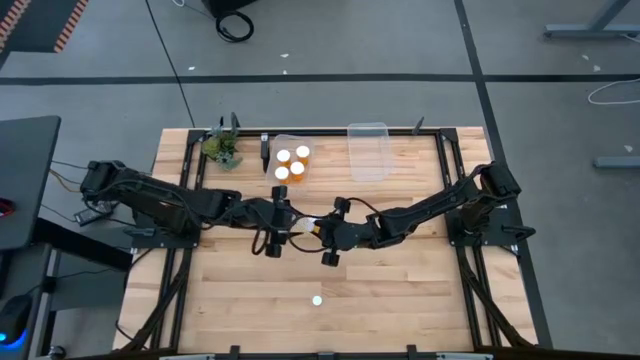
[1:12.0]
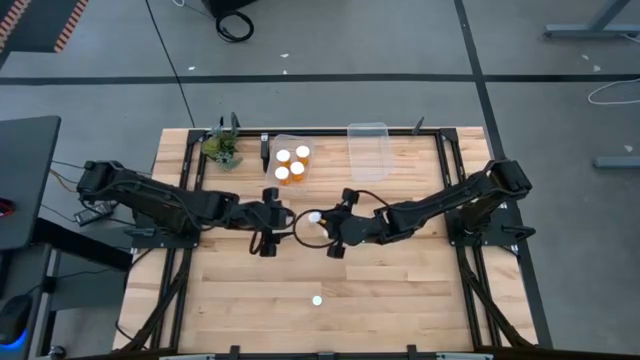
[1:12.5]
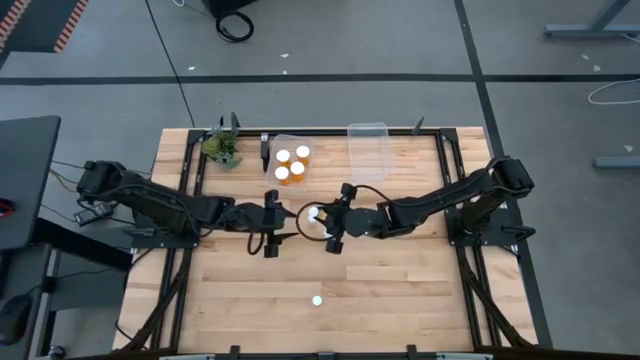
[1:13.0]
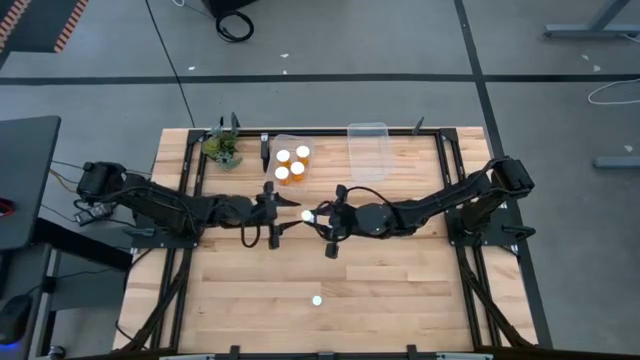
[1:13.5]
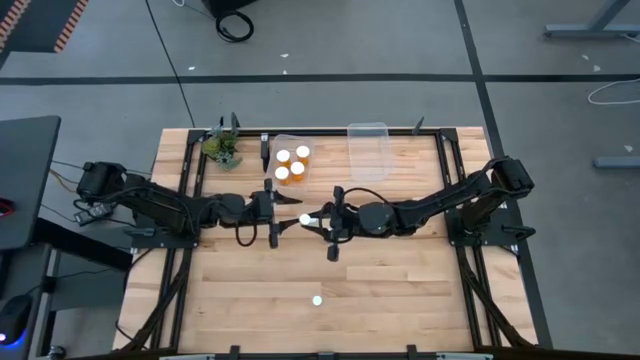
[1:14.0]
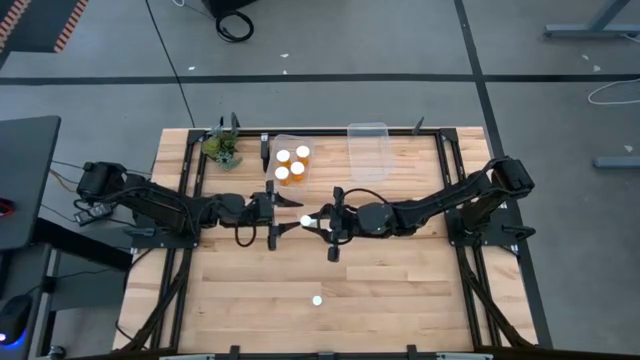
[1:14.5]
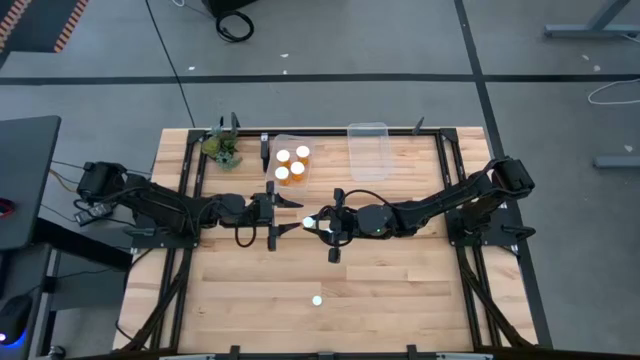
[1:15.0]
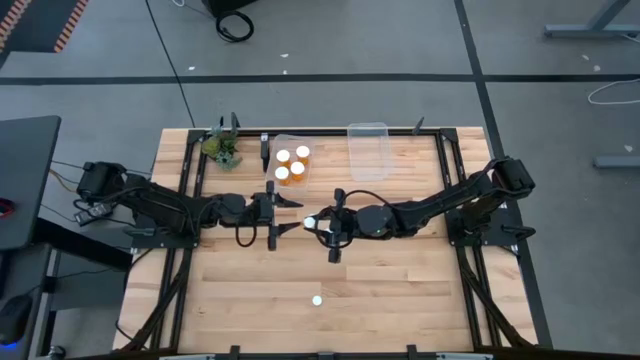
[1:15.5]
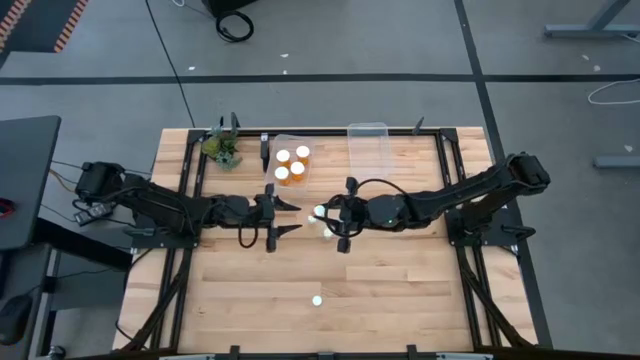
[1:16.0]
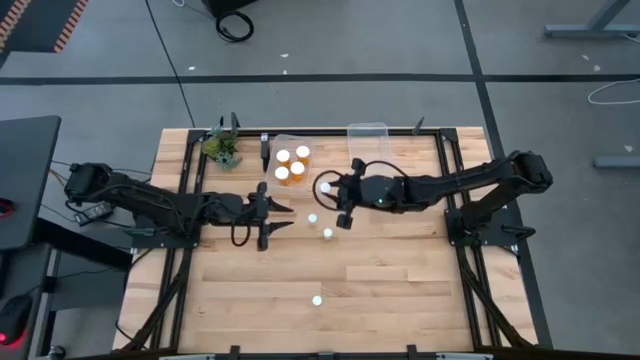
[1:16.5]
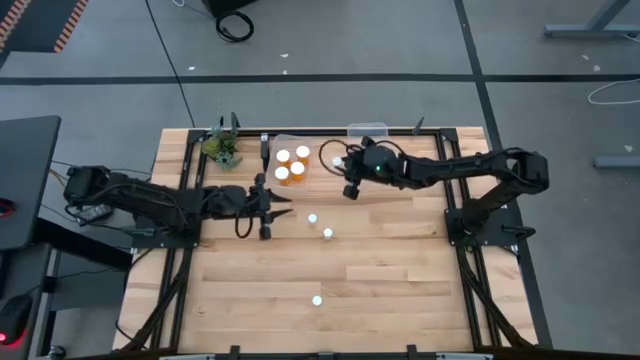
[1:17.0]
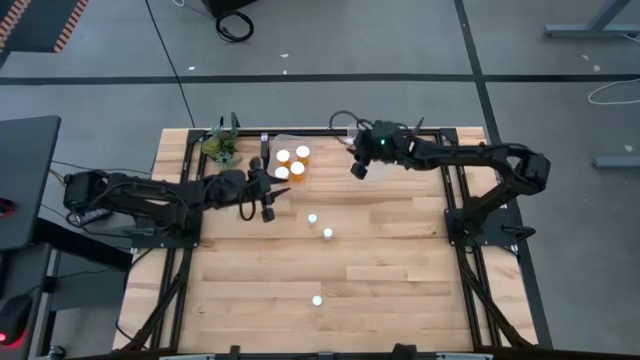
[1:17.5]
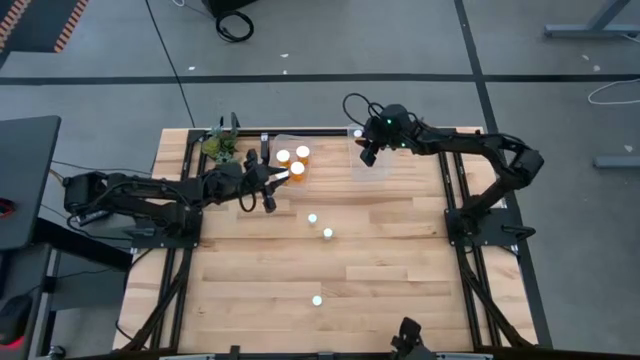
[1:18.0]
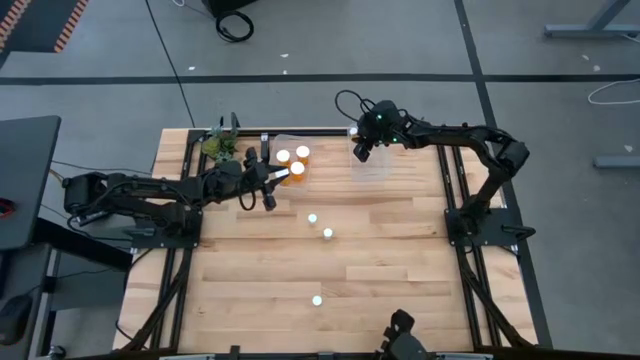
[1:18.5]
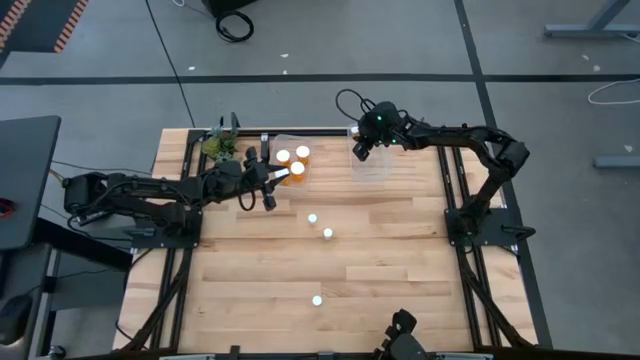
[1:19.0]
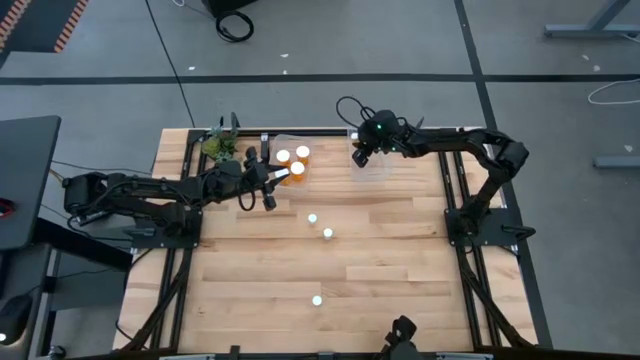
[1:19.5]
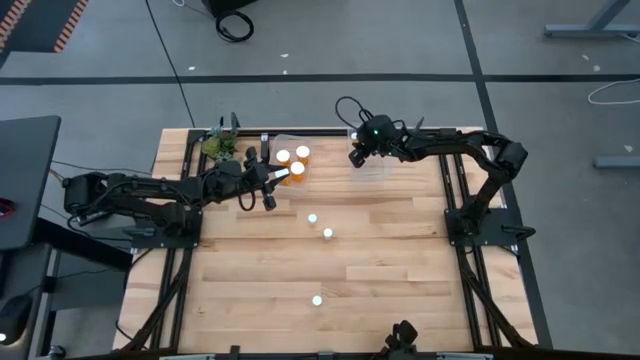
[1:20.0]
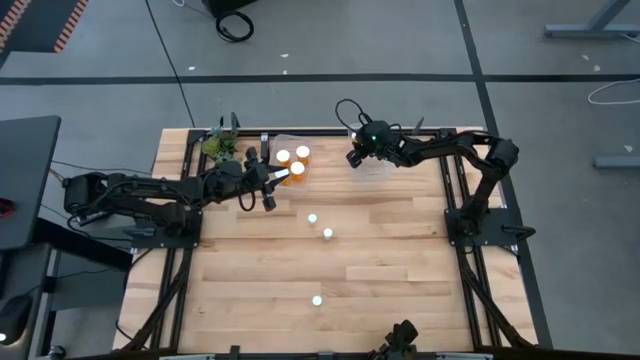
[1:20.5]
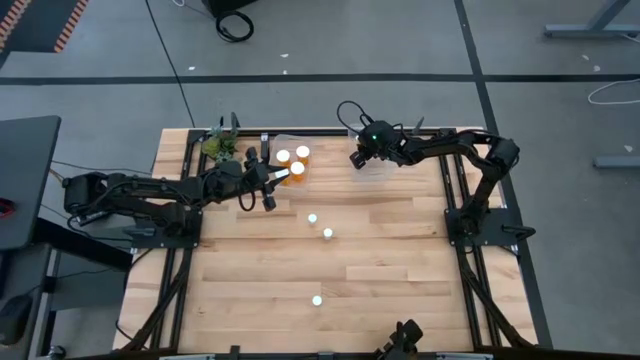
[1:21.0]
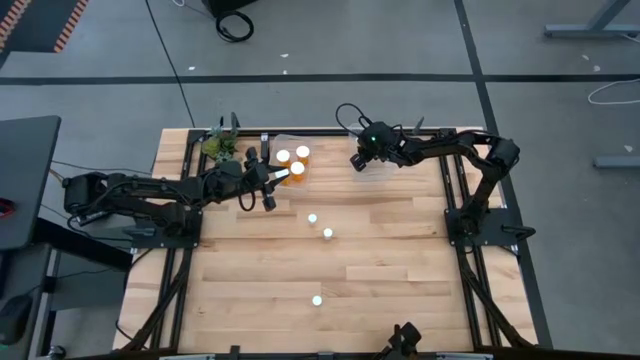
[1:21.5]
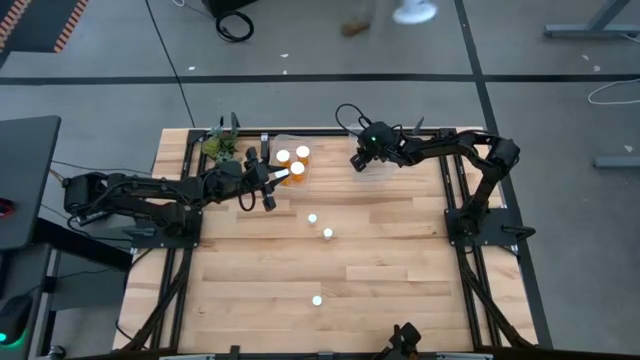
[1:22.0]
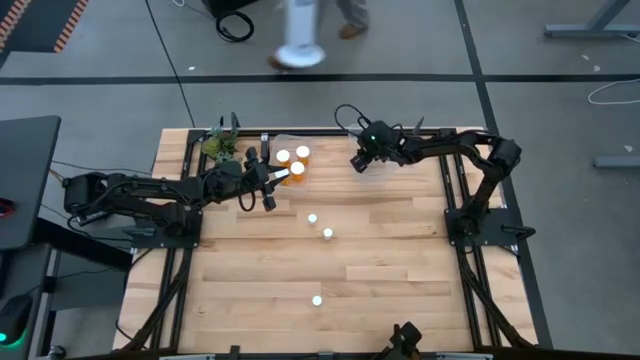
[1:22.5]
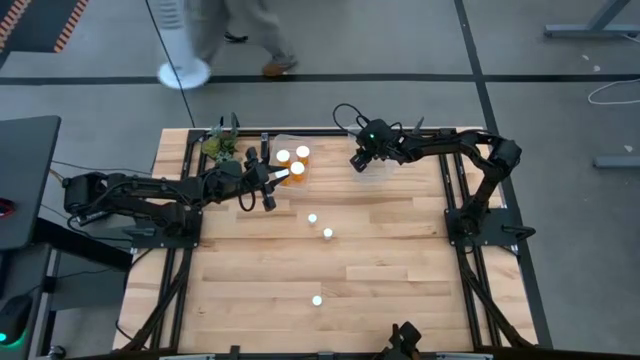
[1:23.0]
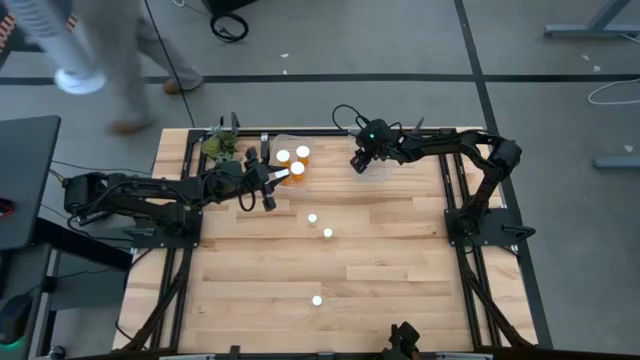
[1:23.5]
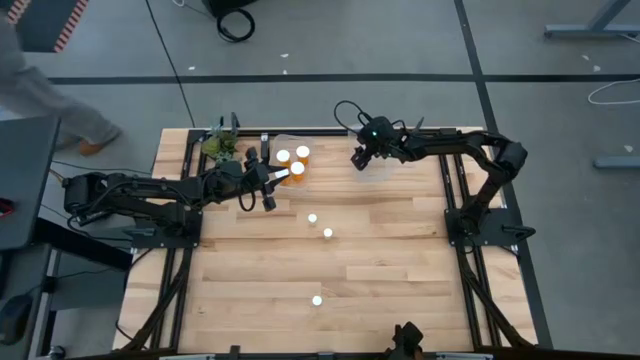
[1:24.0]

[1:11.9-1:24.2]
Task: Pick and place medicine bottles into bin by pill shape (circle, oval)
Put the small orange pill bottle into the right transparent bin

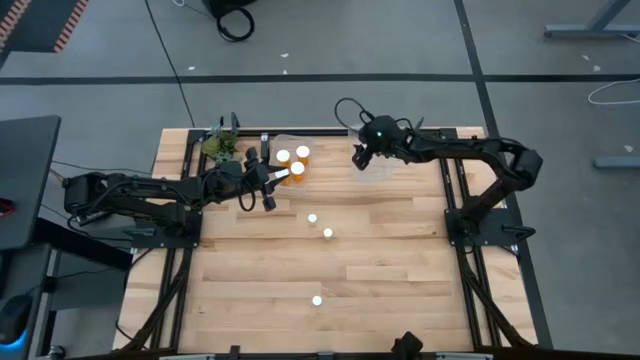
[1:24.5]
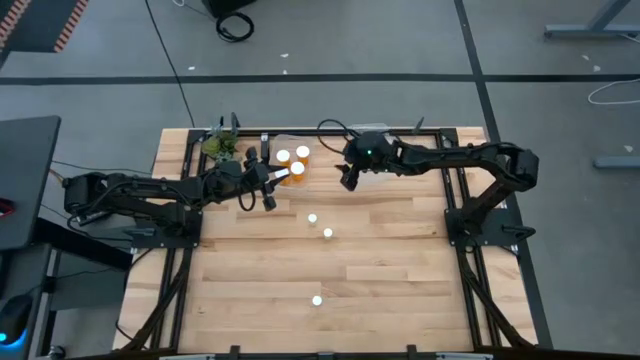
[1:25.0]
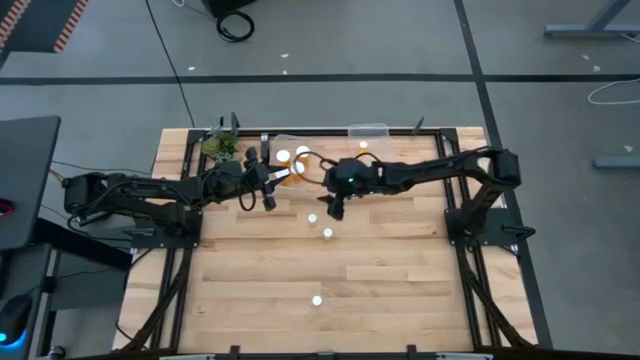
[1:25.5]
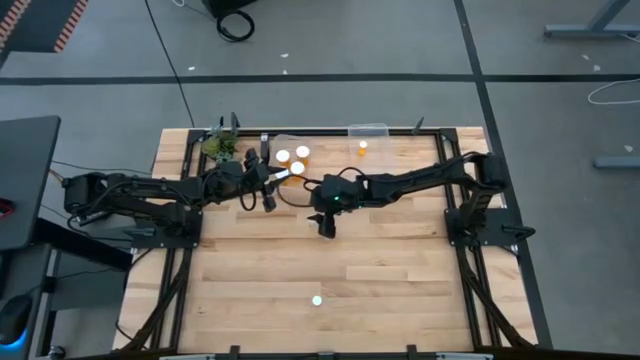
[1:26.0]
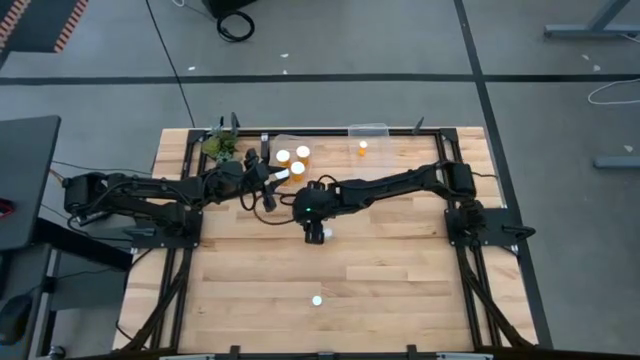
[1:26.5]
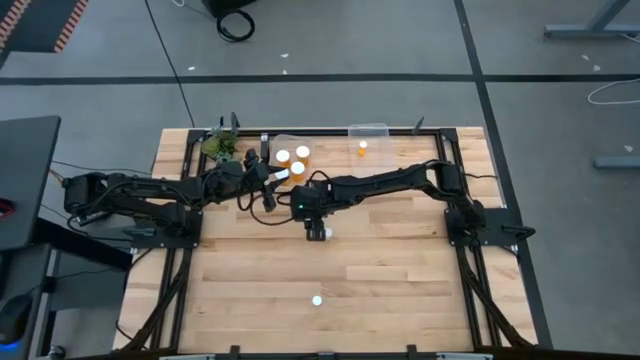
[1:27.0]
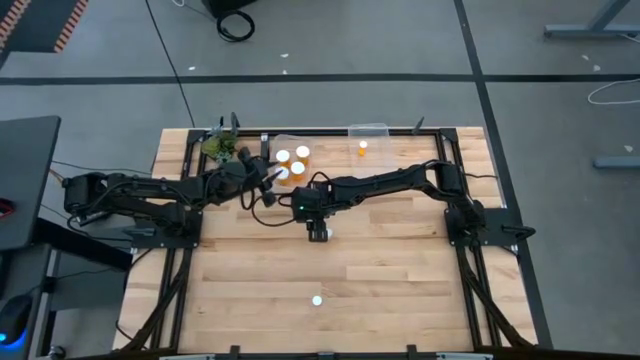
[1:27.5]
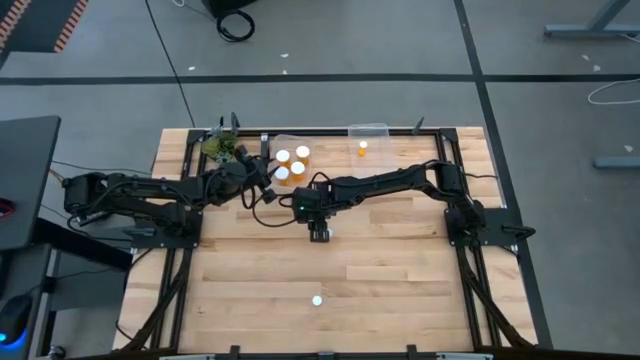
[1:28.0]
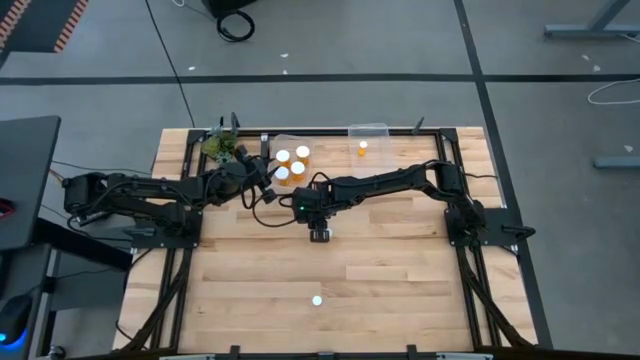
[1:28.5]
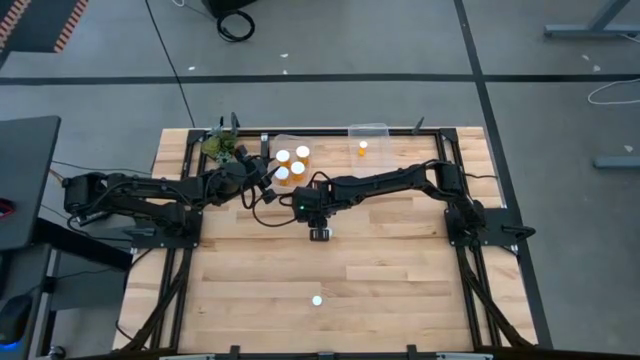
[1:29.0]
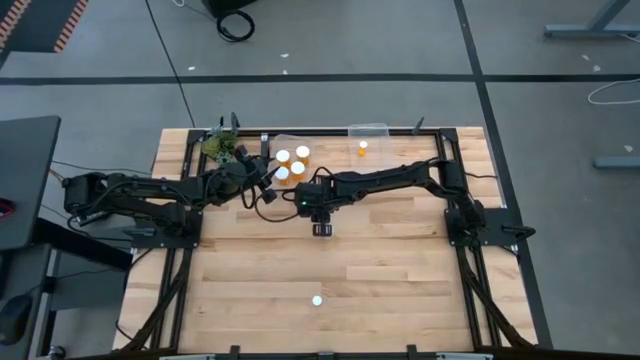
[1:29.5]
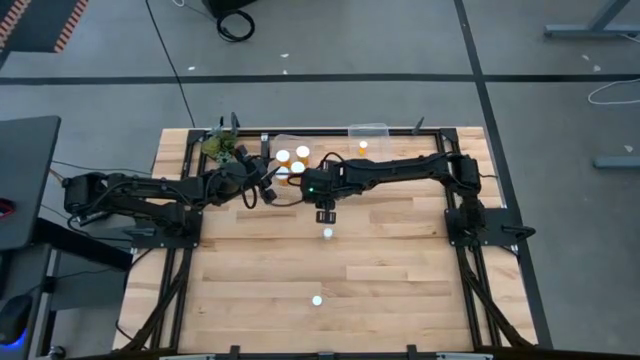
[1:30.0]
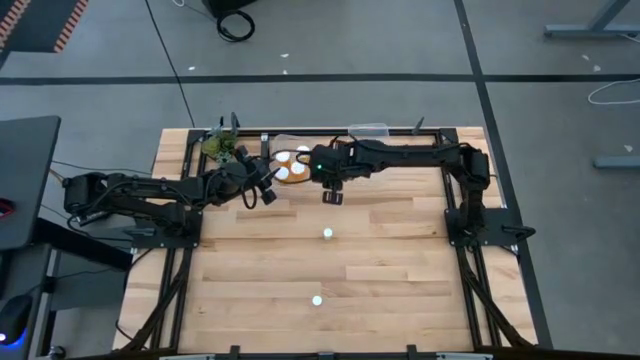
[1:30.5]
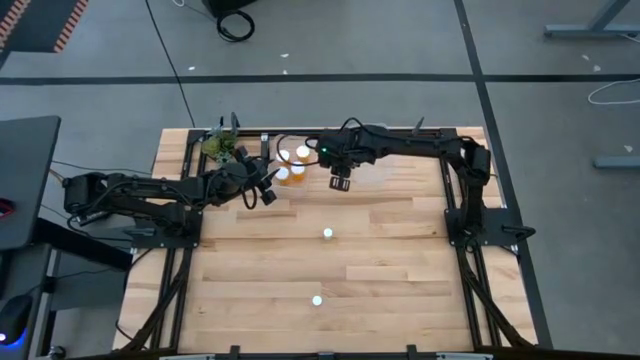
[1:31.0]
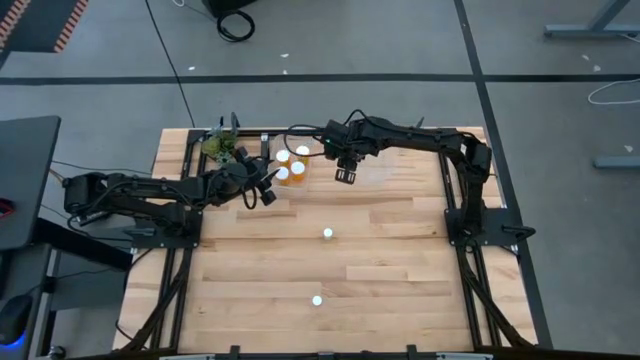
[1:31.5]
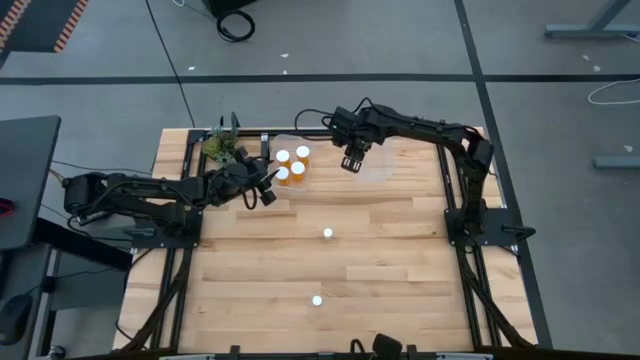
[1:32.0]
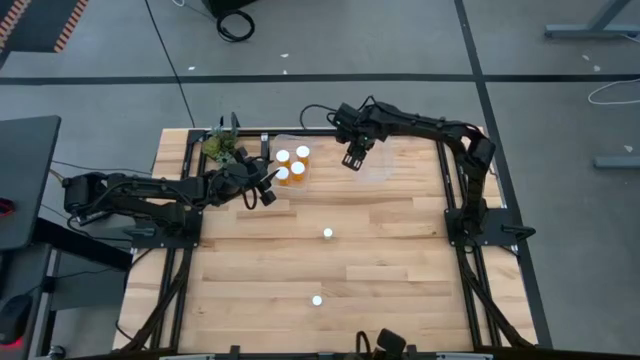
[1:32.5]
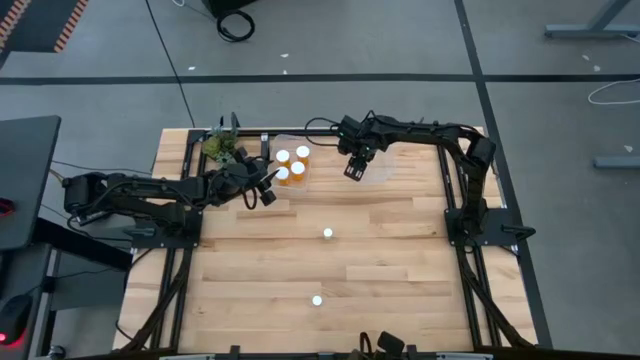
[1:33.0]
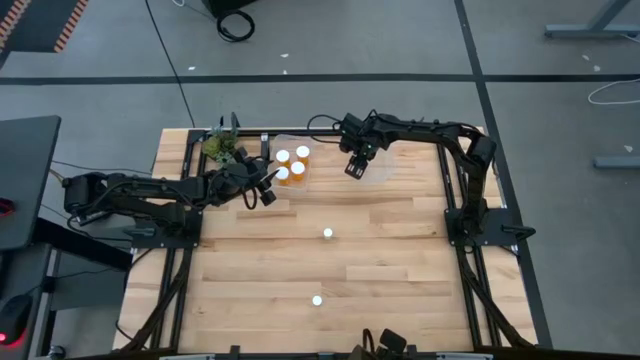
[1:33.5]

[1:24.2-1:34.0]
Put the small yellow pill bottle into the right transparent bin
